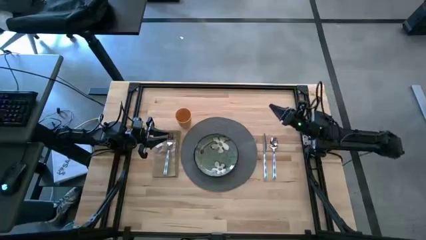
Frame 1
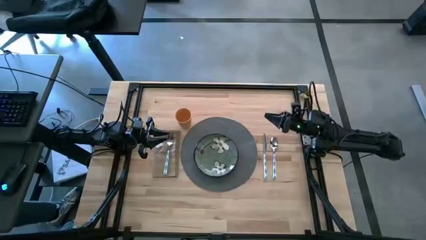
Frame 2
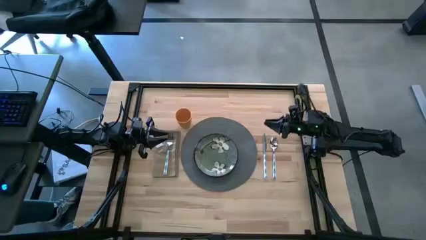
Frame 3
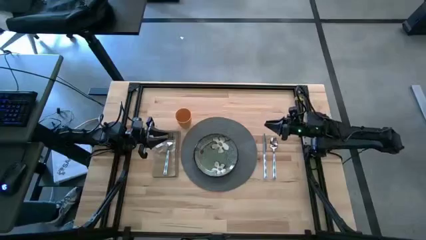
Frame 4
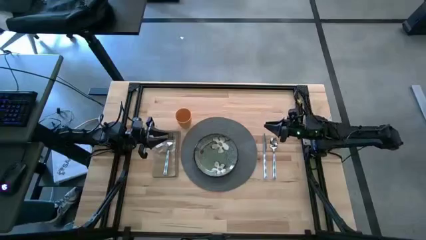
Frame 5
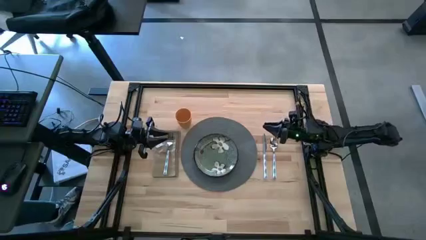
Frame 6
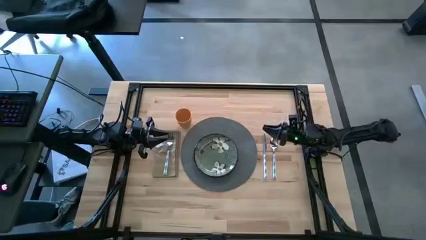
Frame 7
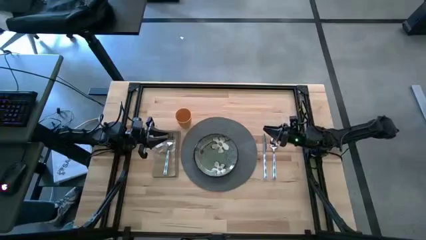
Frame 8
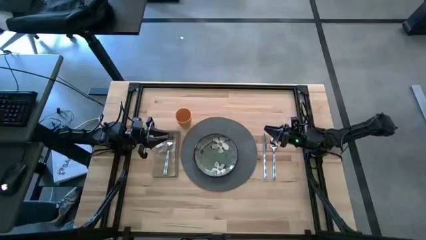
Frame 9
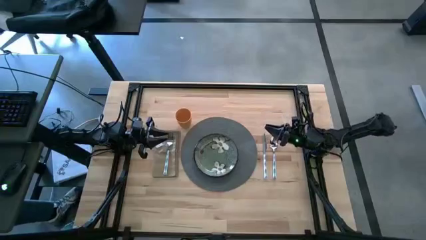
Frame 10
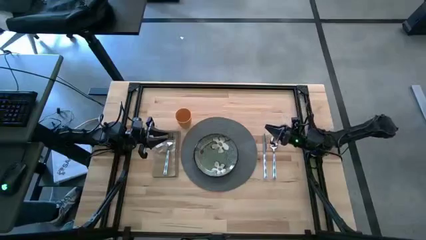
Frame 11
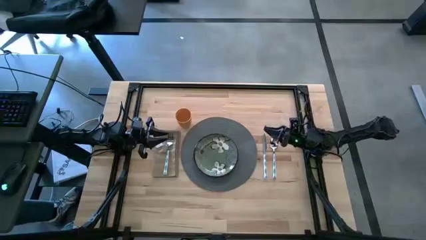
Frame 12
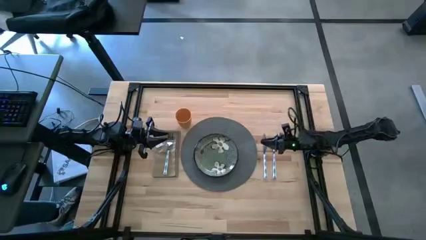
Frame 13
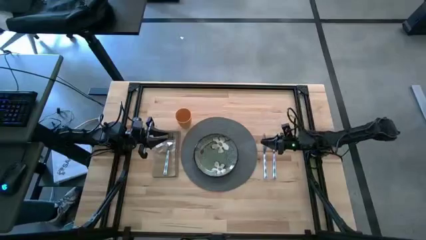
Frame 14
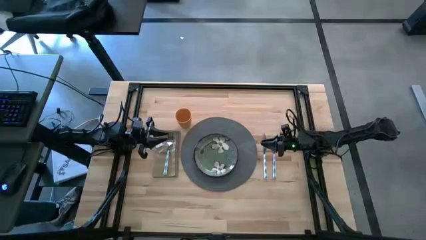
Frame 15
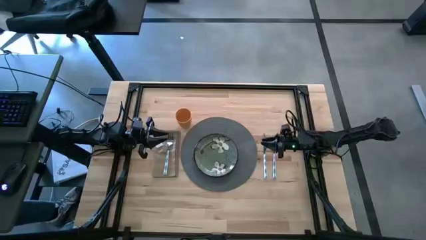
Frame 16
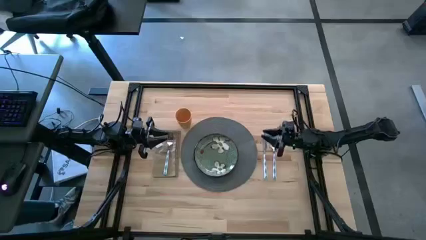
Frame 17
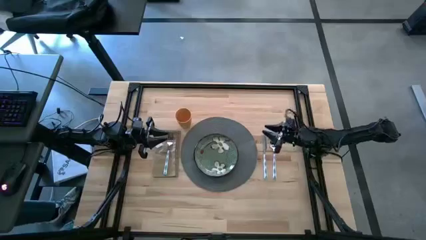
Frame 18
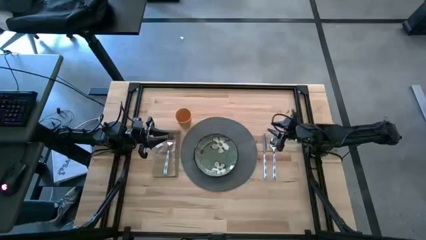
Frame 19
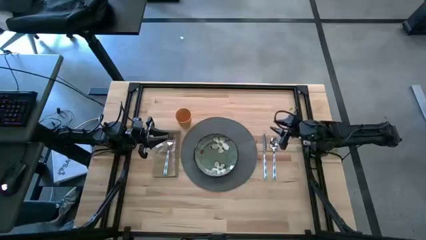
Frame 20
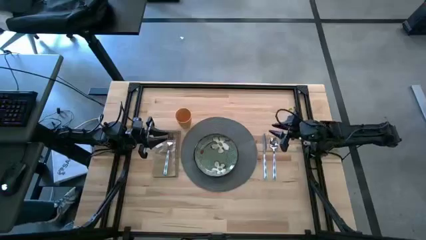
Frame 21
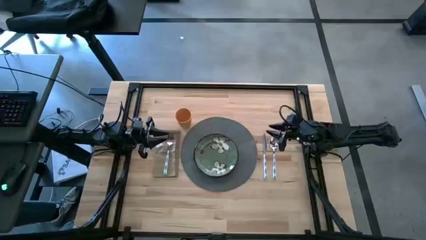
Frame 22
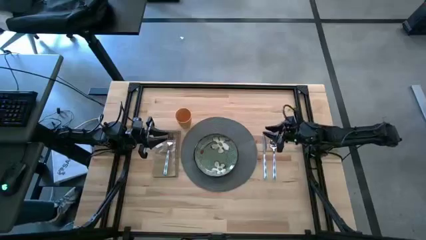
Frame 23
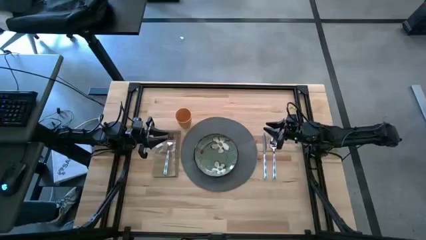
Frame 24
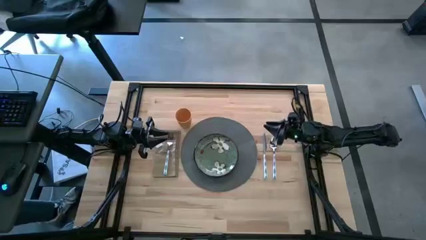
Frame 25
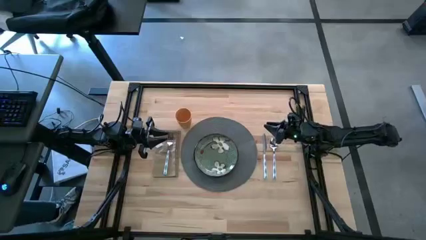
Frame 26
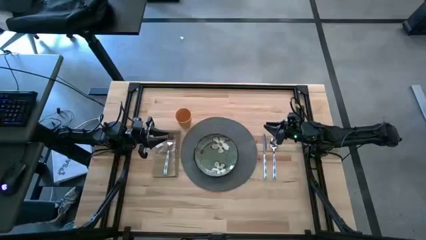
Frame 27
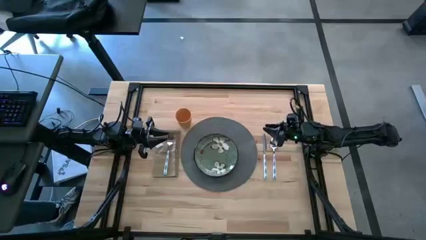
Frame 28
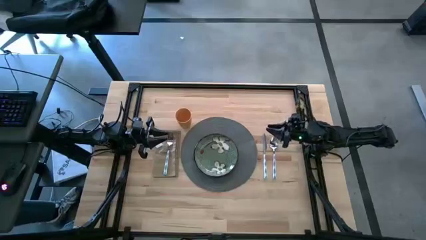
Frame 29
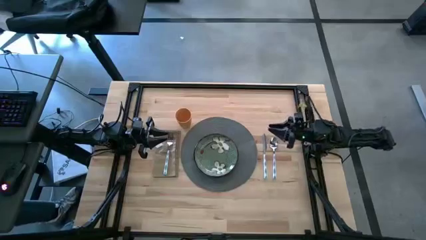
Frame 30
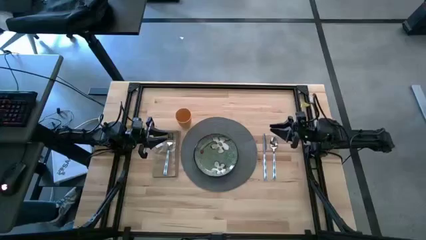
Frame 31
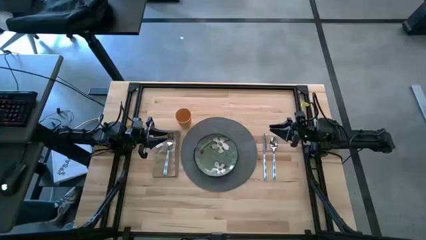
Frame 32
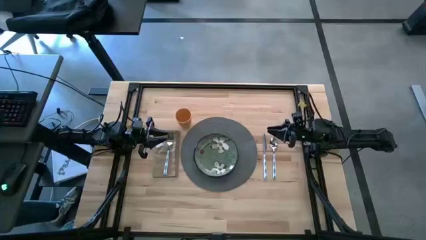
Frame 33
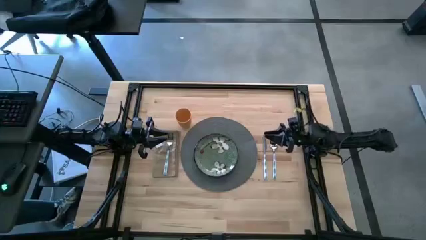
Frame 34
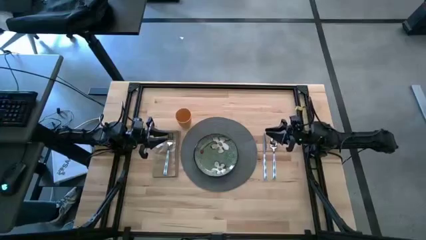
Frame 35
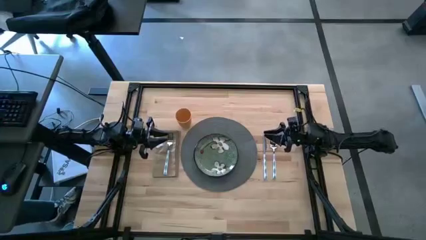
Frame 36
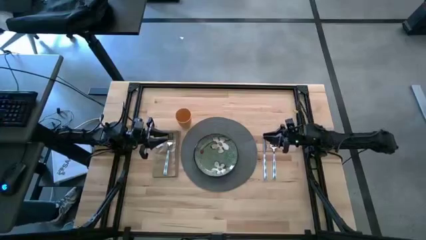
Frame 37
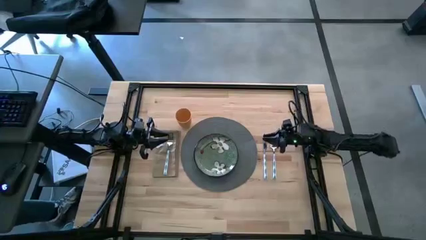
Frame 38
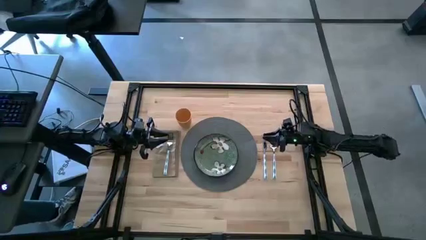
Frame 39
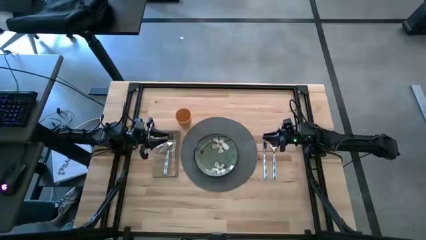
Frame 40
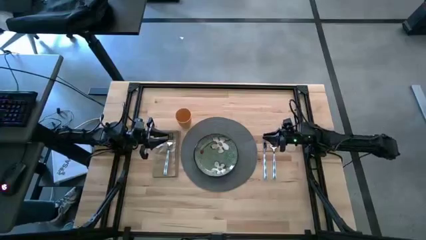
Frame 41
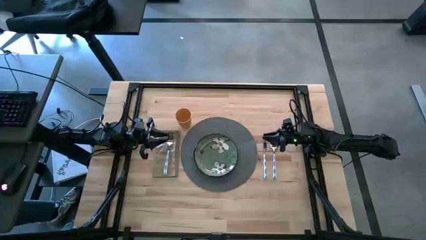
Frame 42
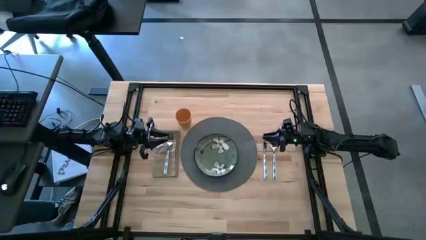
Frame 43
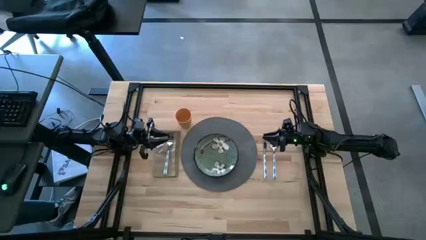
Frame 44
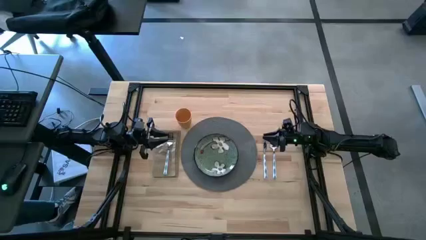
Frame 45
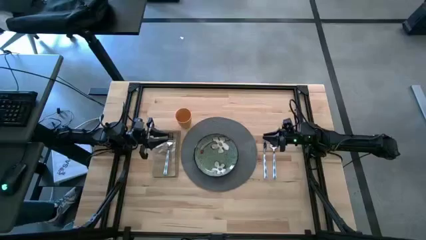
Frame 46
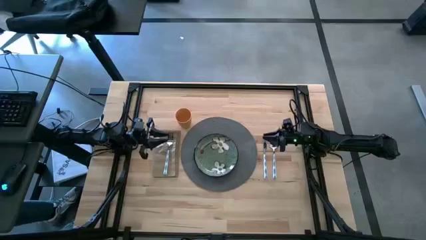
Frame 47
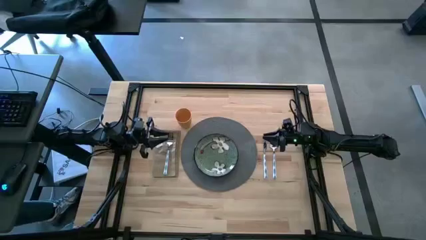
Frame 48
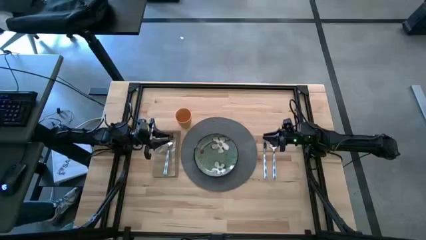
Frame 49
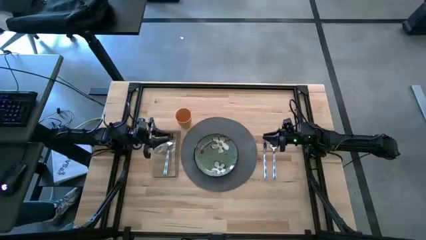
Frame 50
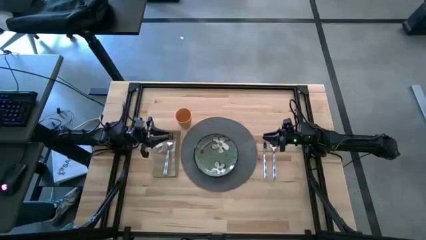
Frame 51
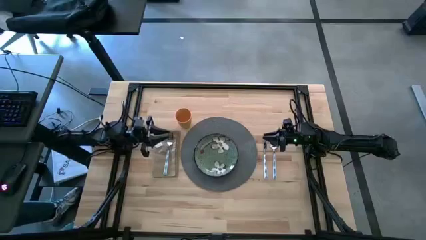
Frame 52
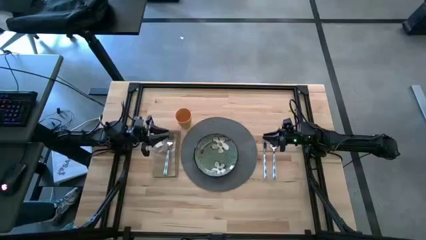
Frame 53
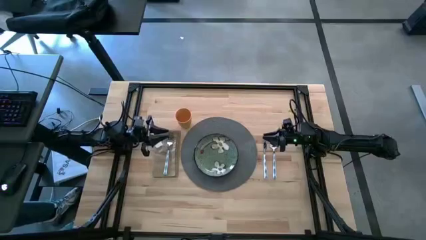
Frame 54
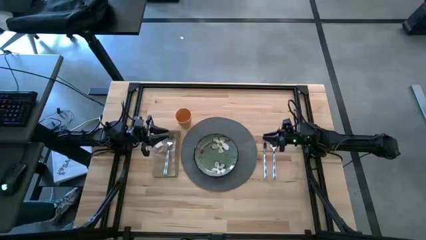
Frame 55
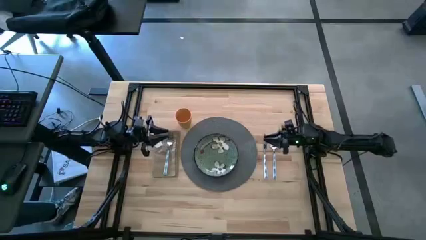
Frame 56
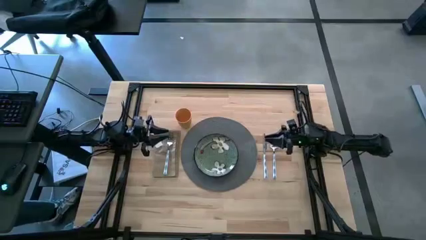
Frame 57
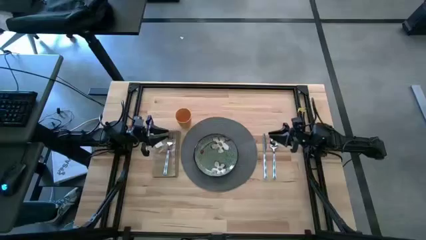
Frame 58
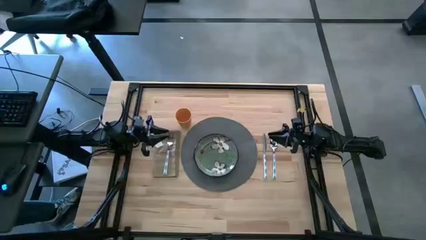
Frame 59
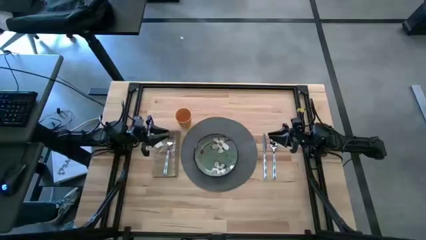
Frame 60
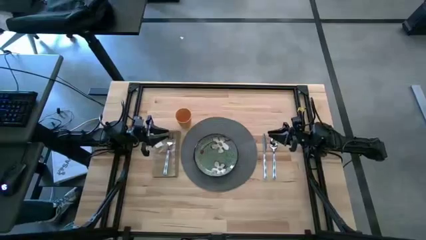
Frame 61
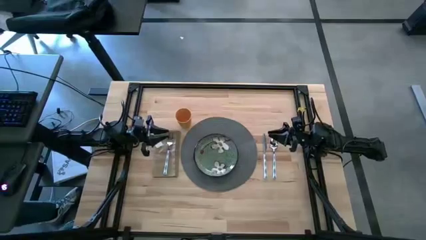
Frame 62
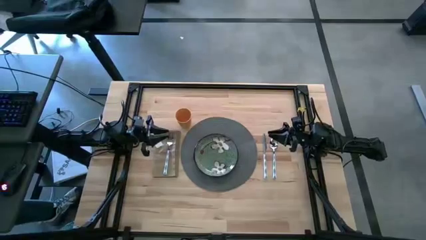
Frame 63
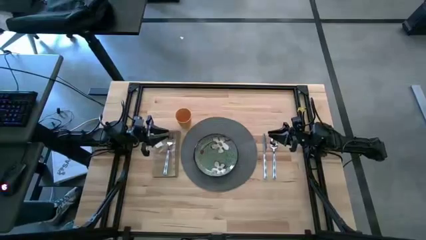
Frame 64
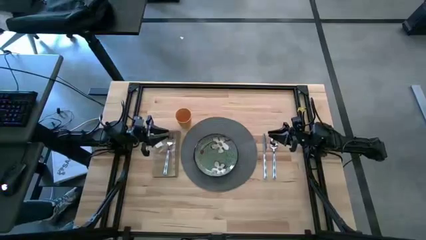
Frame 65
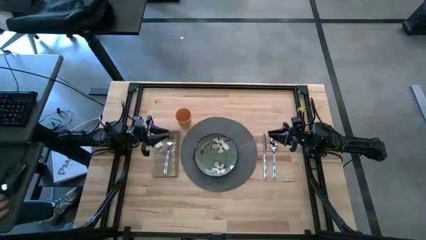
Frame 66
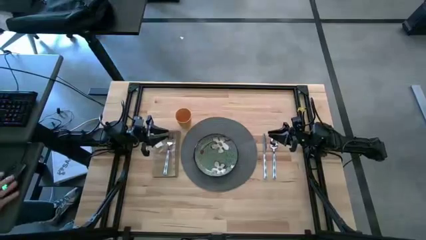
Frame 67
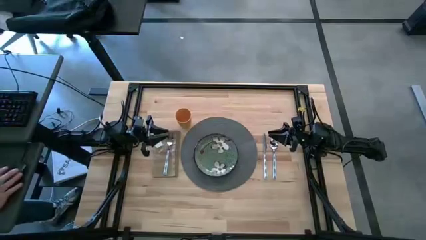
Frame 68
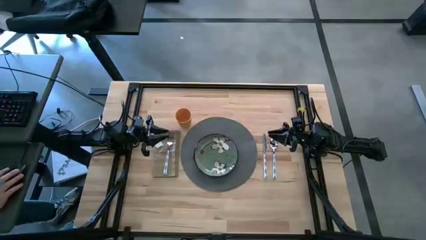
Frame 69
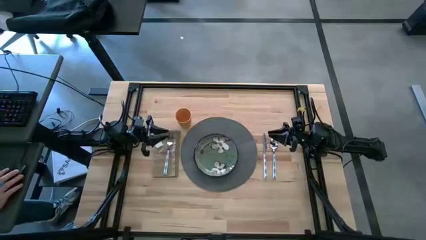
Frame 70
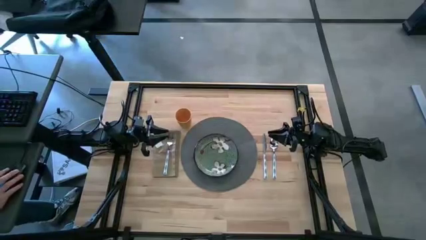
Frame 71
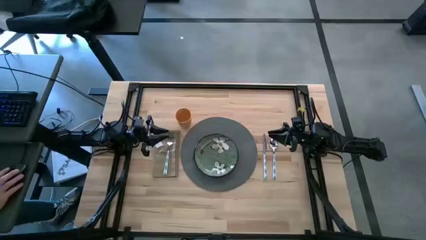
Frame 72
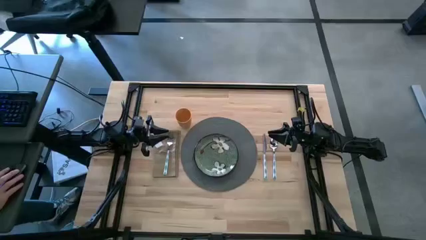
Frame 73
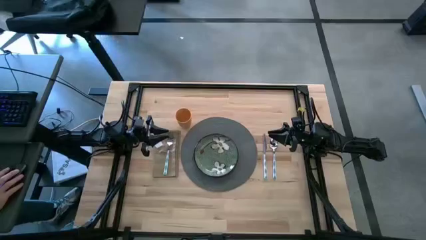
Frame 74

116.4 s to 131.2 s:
Task: Set table place
Return to Home Position

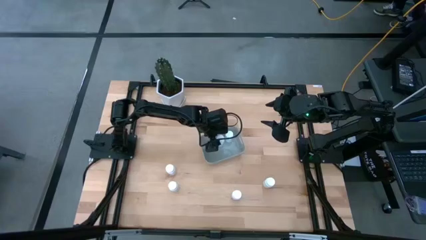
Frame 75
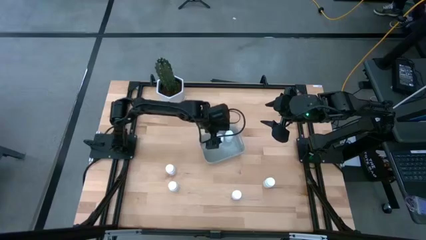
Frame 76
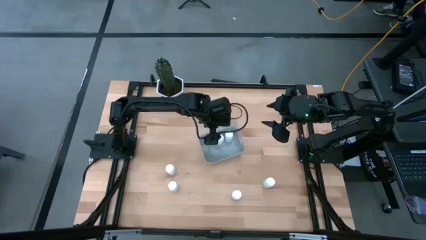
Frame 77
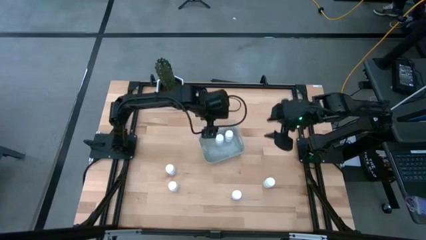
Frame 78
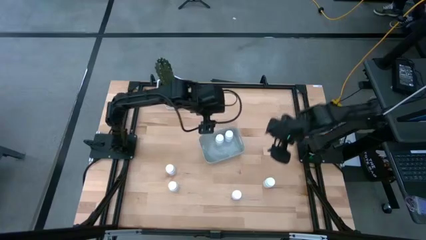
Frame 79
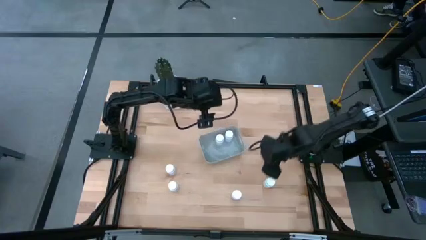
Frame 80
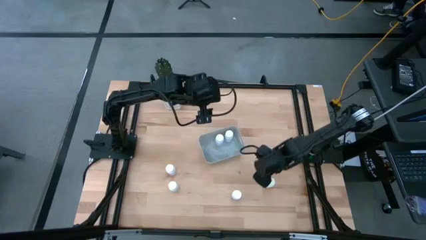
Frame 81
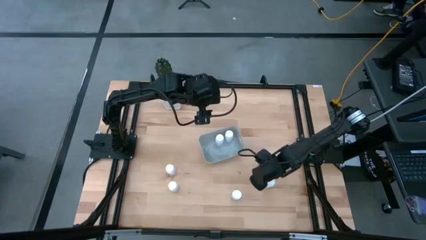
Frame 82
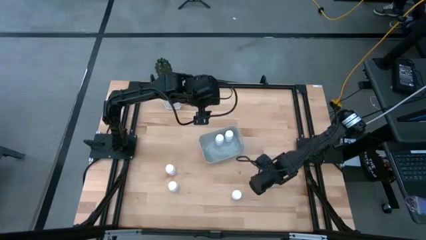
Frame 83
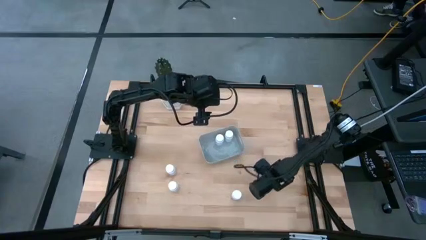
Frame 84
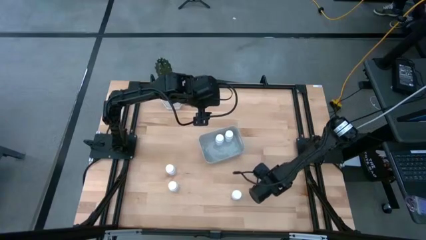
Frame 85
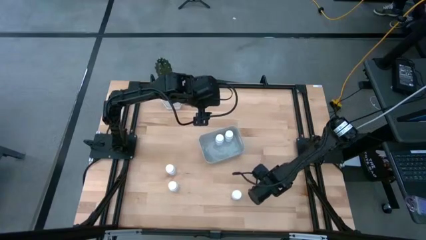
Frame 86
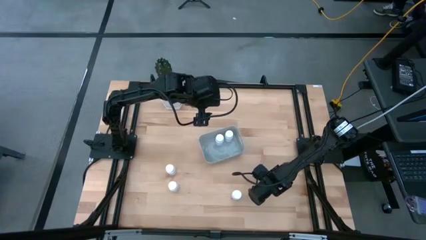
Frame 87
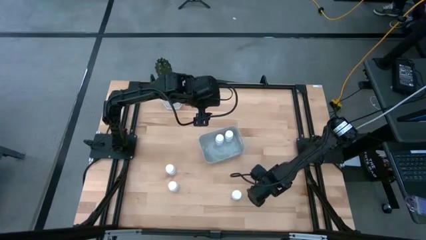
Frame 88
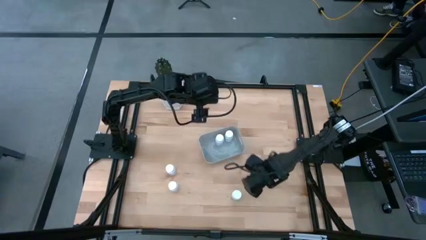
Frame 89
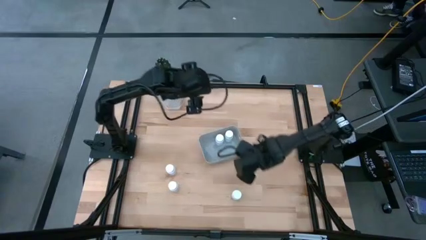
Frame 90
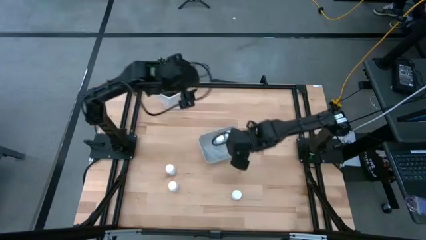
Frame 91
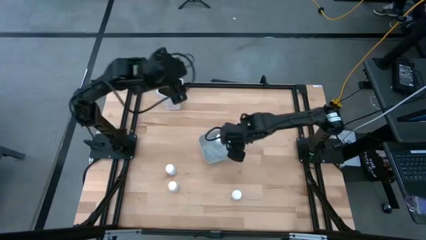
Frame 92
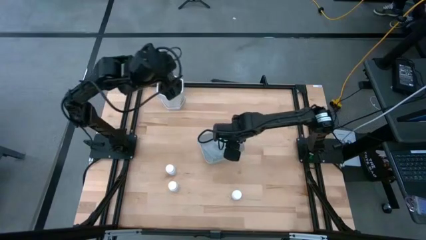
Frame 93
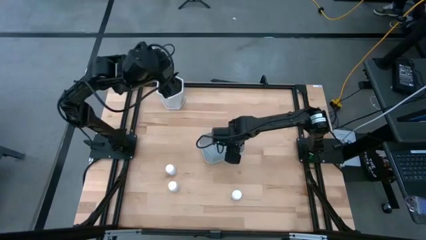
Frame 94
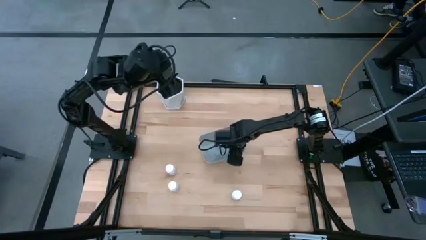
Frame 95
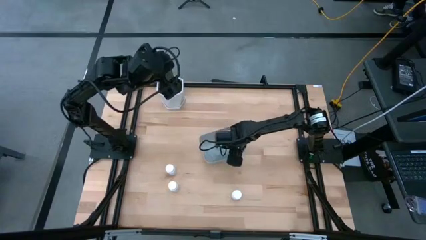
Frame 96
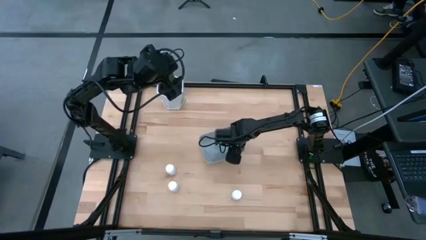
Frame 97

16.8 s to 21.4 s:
Task: Pick and place pill bottles into a basket
Put the white pill bottle into the gray bin
